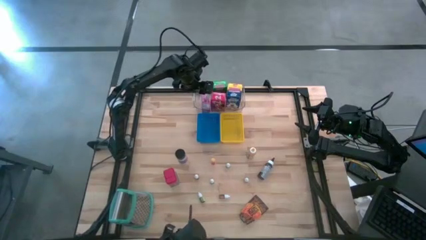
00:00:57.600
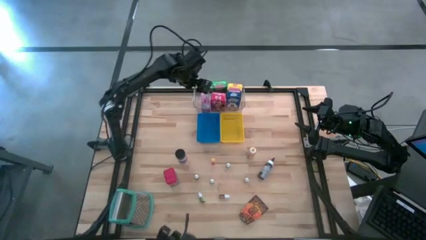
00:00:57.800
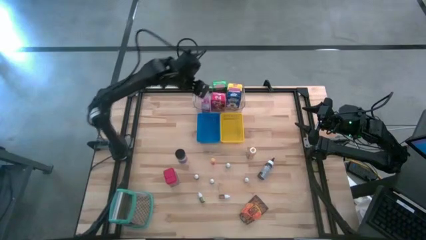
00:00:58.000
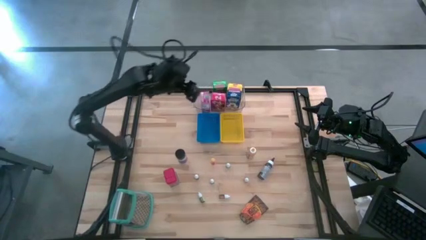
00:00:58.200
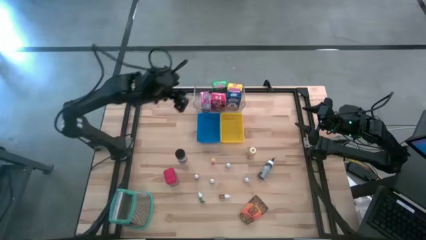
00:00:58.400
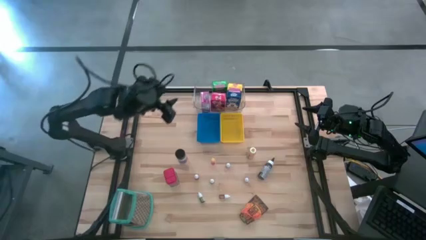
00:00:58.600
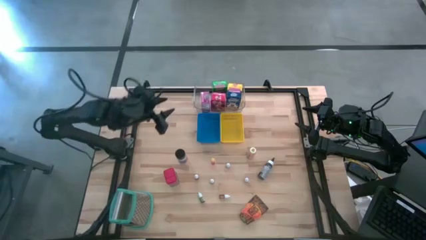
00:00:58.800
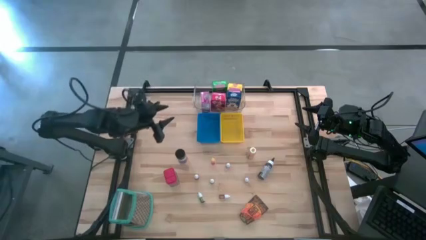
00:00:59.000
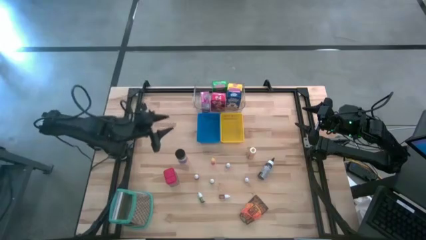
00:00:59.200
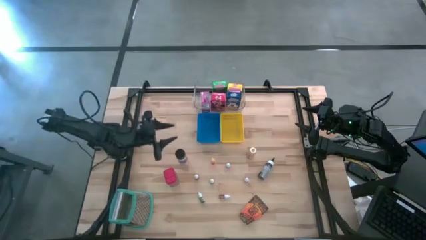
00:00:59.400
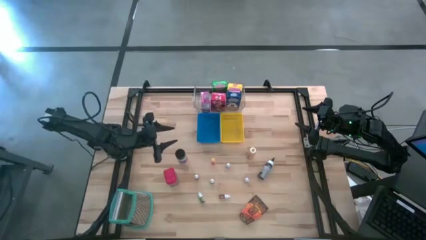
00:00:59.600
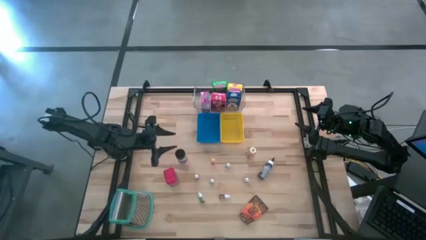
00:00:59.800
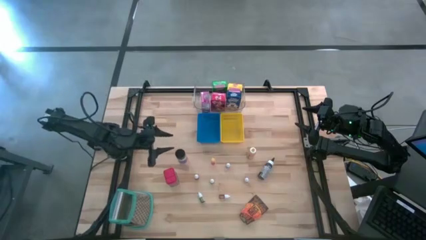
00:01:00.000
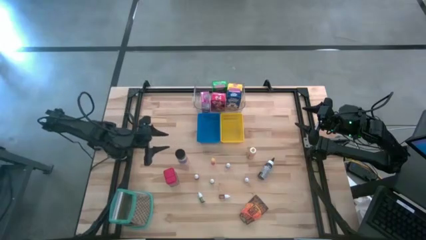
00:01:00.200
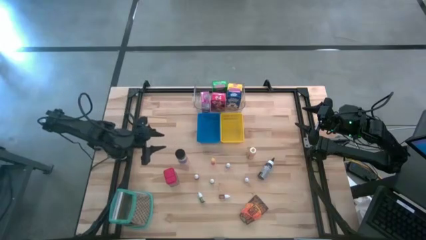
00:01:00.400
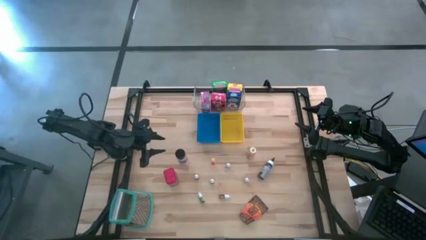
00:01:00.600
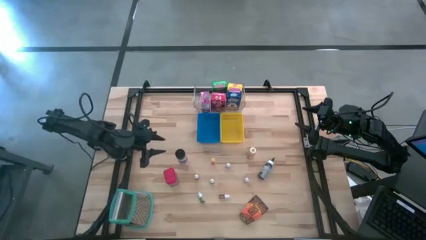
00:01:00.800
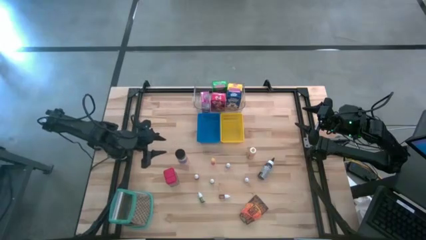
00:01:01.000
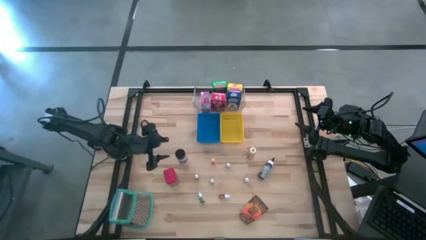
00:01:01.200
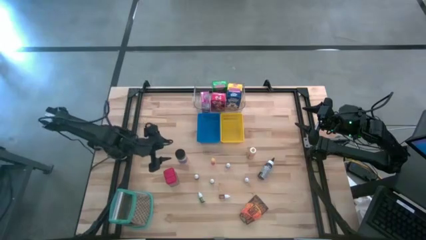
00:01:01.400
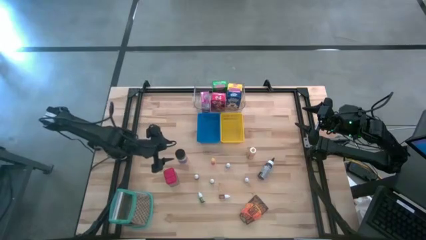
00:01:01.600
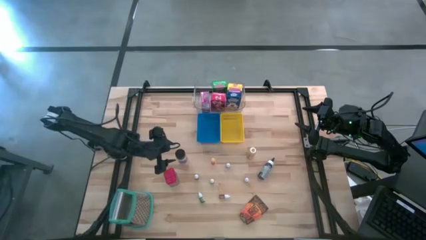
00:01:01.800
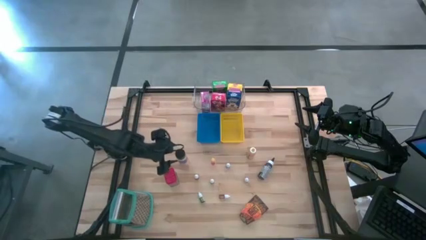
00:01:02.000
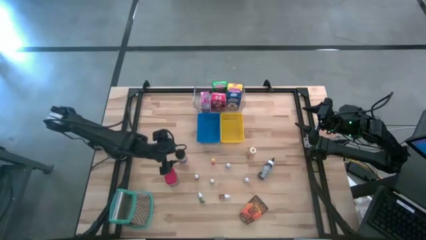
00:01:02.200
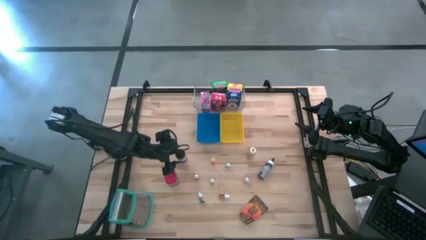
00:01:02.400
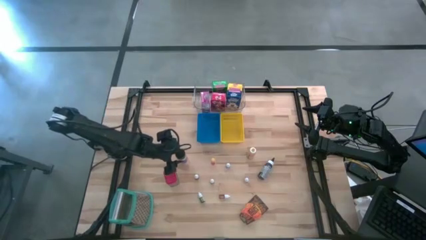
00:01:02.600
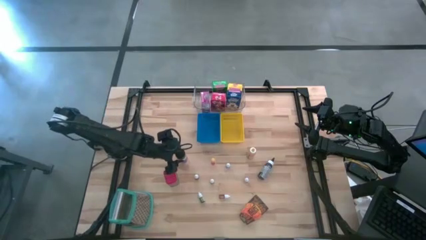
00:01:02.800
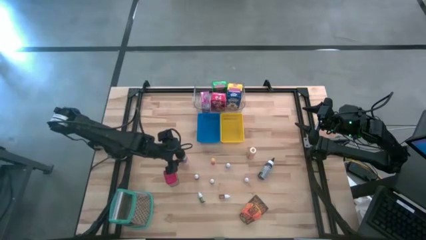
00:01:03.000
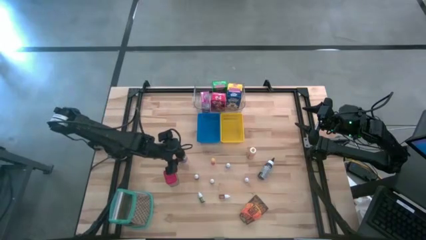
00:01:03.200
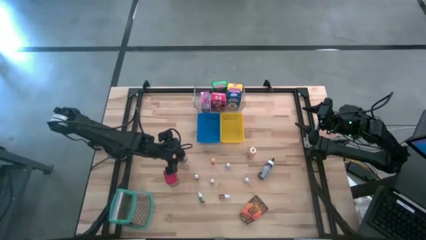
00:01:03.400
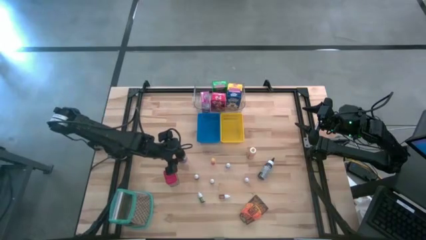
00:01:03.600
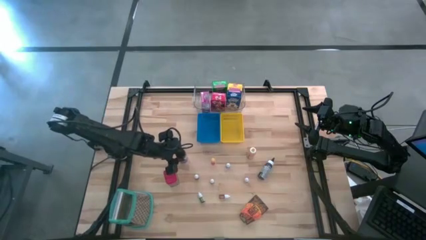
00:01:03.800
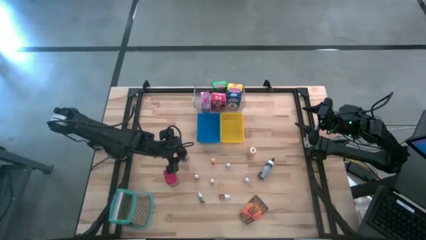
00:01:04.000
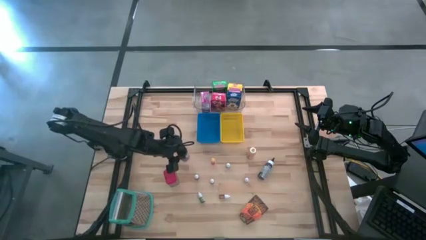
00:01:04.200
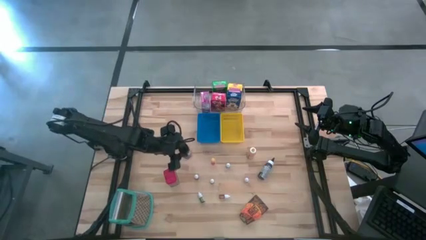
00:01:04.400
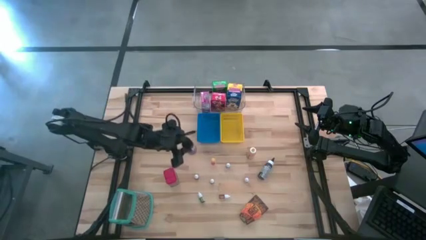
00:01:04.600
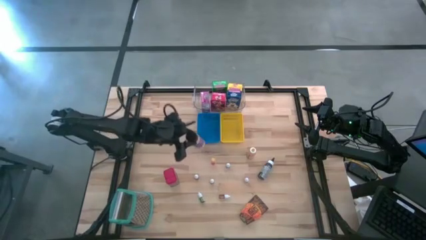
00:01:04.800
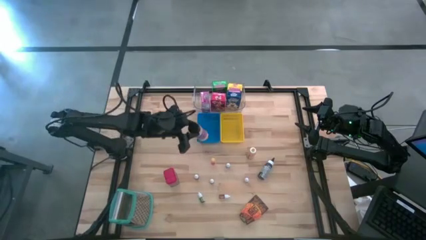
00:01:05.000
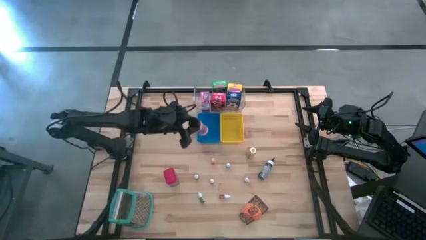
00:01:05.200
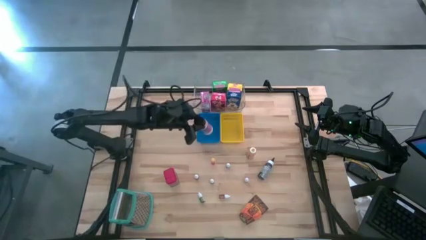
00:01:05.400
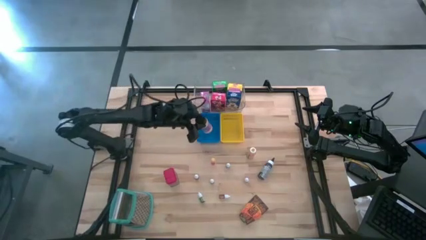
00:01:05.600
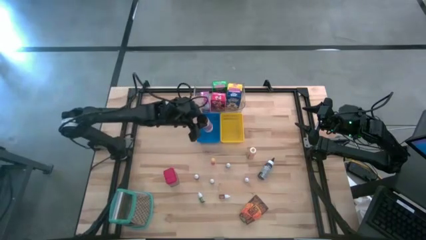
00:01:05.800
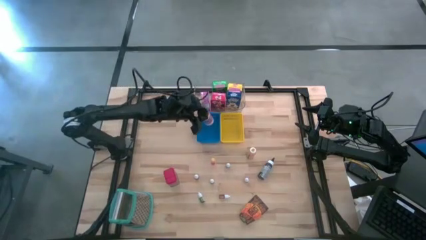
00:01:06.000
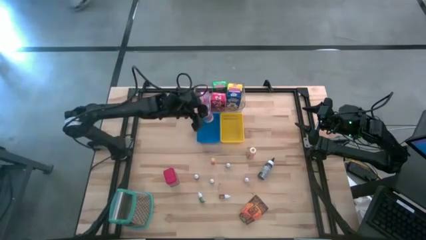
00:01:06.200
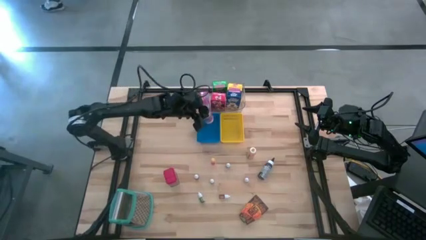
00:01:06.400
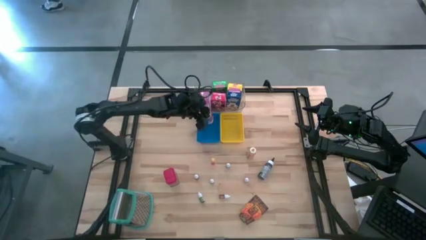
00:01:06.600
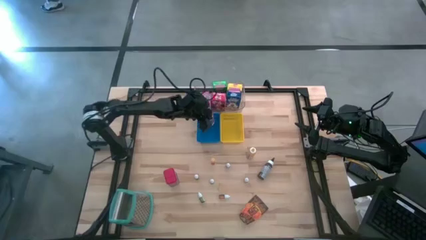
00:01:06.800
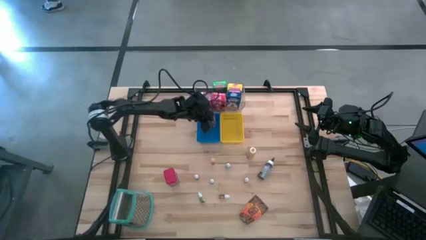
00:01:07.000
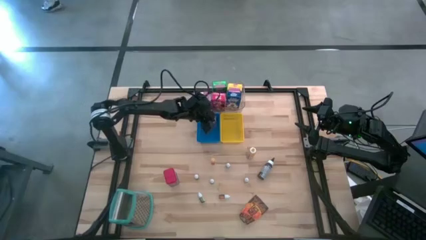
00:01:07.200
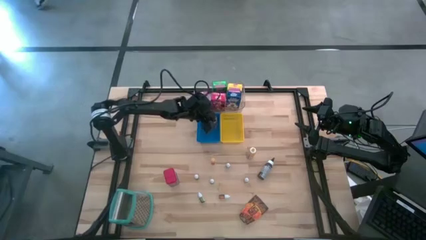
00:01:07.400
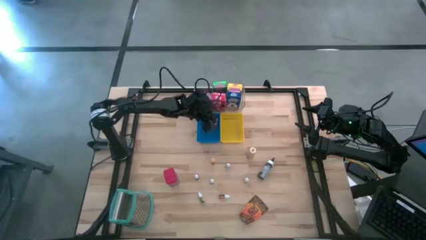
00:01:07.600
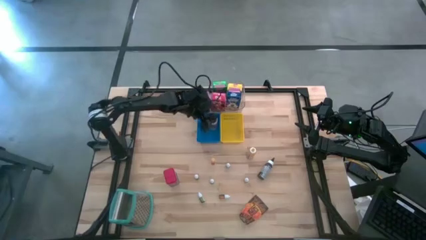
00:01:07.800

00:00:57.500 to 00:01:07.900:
Task: Pick & Place Kitchen Items
Put the black seasoning bottle into the blue bin

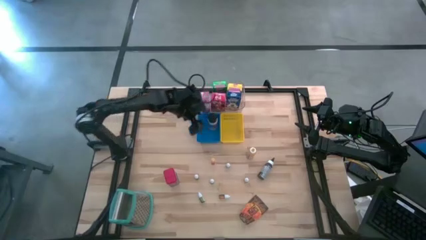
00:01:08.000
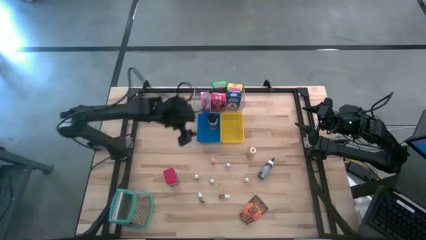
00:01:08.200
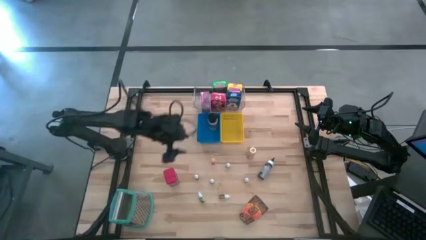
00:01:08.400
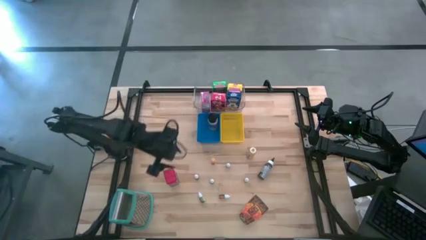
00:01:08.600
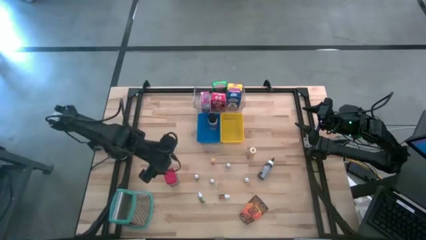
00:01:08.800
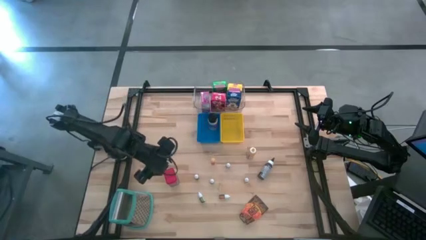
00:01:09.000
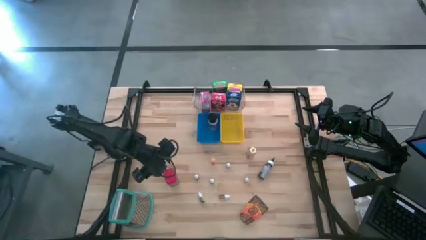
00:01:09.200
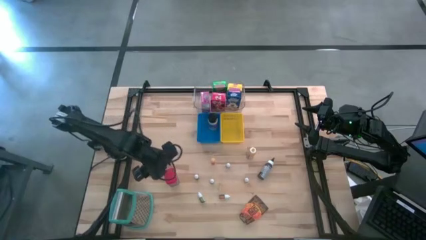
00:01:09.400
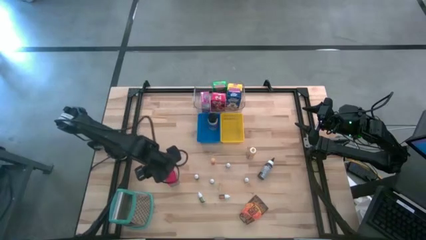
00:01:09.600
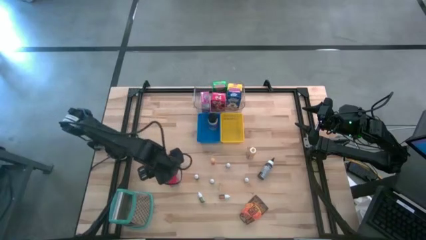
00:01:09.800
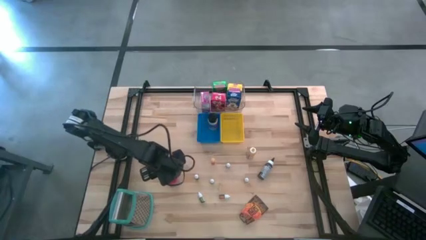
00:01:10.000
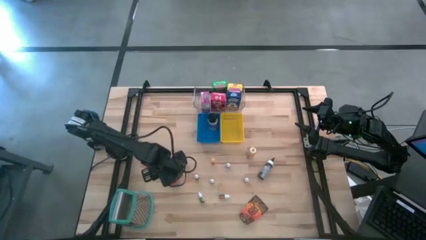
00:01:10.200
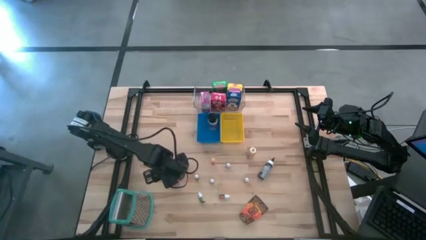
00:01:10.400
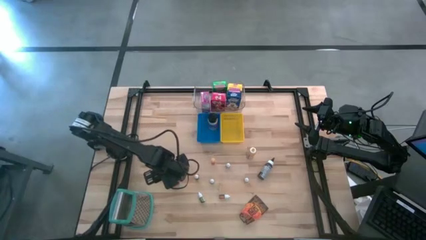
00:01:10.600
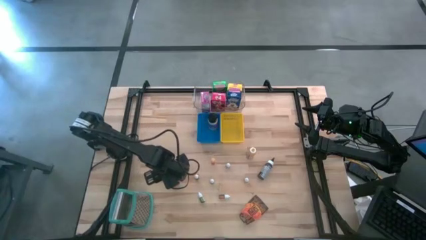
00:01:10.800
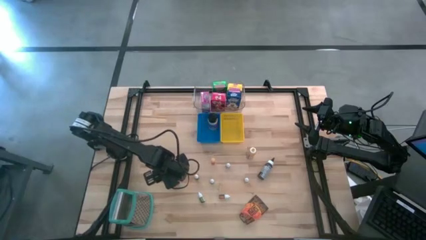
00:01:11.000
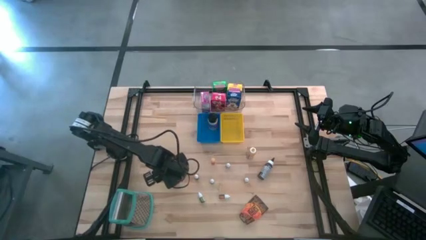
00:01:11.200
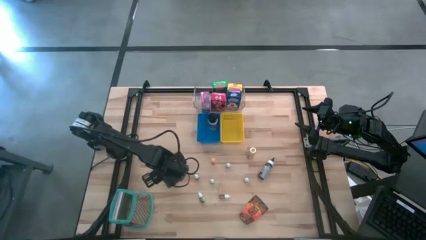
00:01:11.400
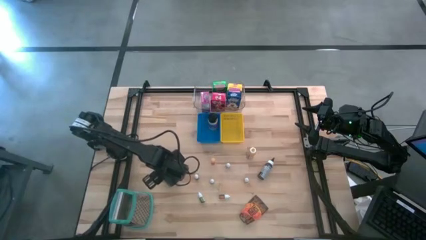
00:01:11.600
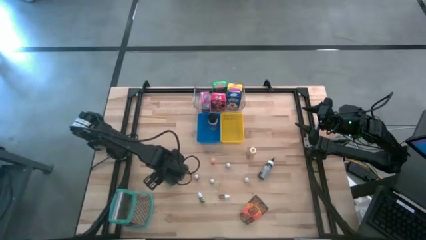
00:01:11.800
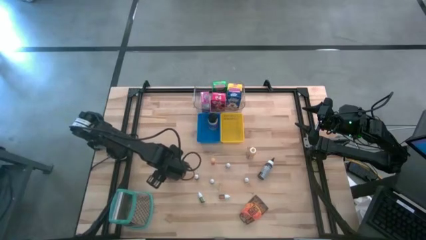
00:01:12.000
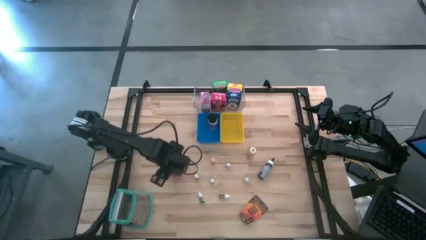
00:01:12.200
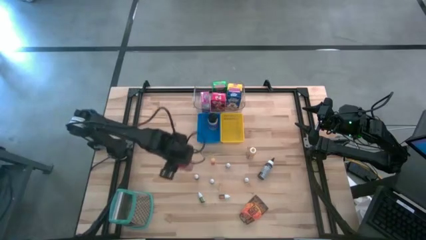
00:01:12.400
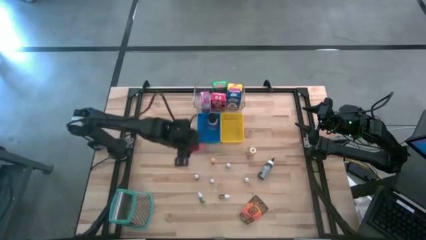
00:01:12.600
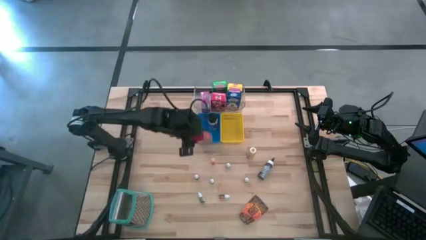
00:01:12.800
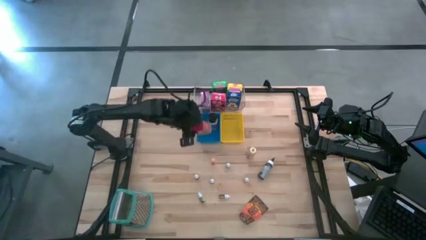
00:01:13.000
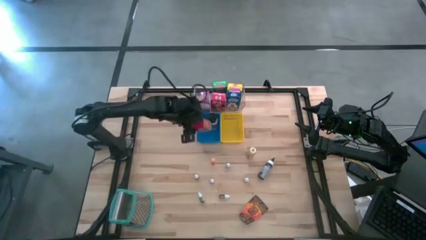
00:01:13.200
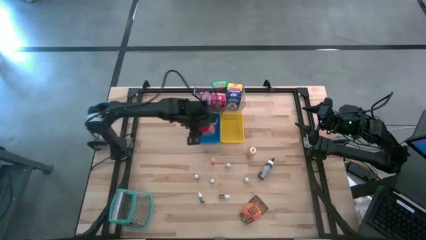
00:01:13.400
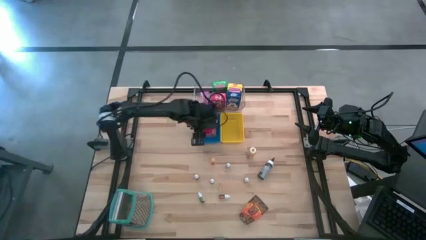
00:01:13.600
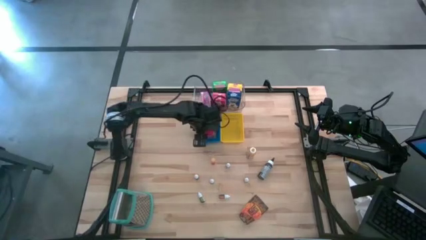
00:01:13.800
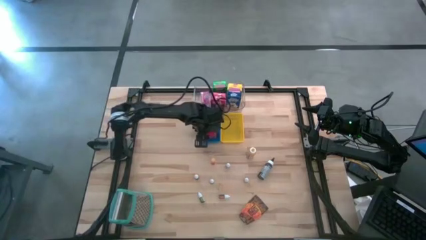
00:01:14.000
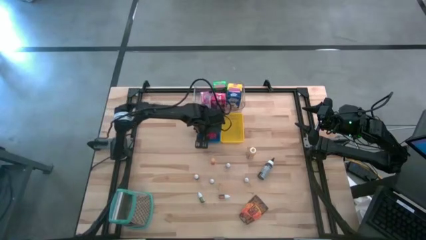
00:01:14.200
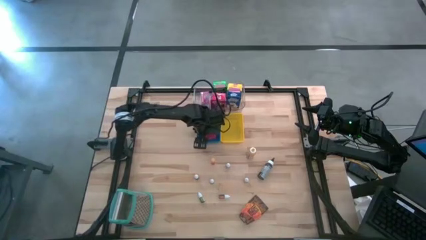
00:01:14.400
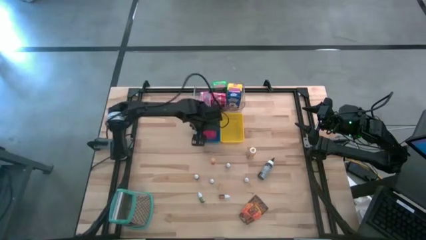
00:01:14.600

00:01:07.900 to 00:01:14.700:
Put the red seasoning can into the blue bin
